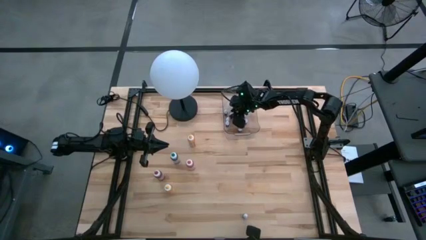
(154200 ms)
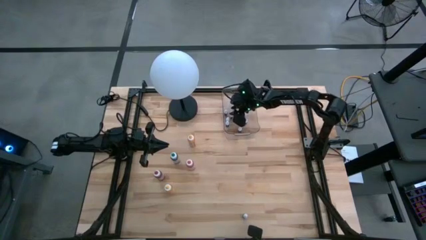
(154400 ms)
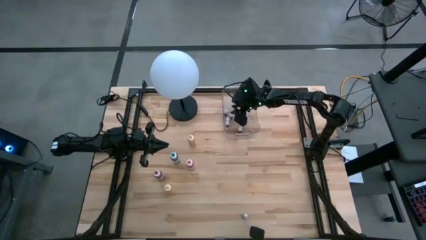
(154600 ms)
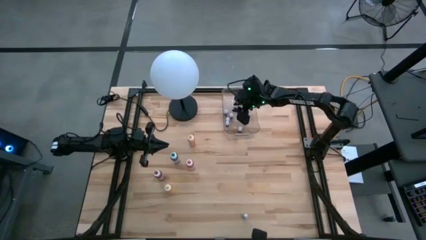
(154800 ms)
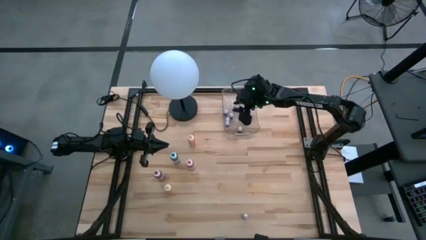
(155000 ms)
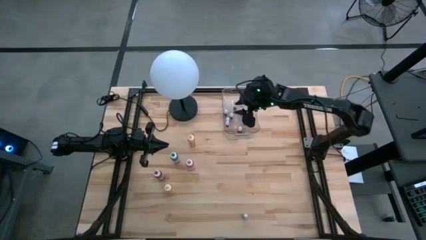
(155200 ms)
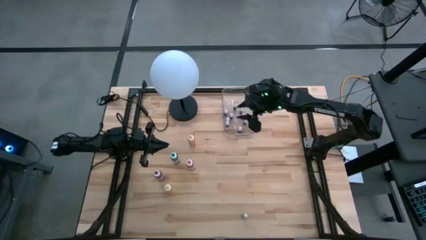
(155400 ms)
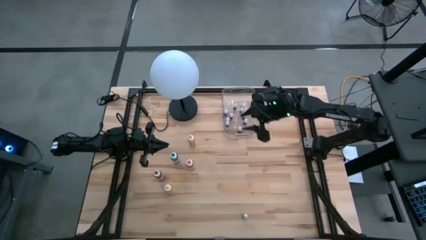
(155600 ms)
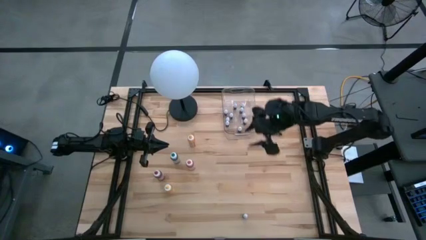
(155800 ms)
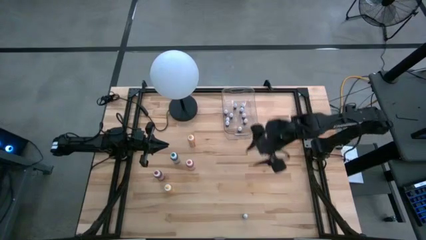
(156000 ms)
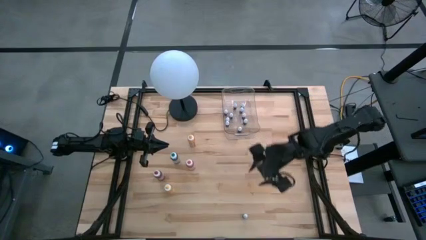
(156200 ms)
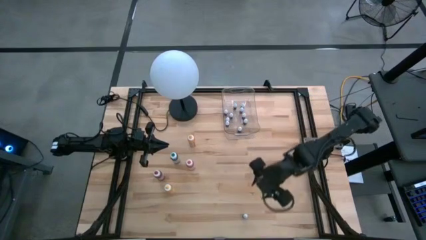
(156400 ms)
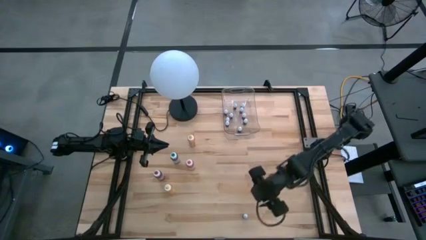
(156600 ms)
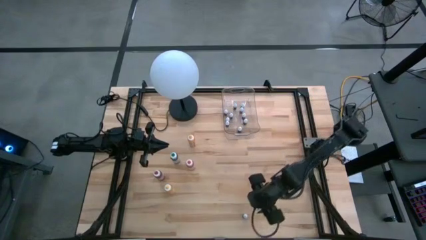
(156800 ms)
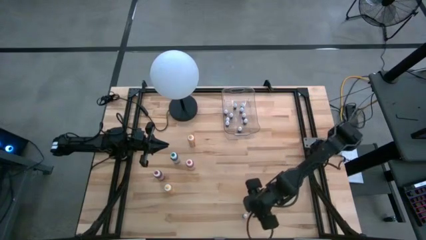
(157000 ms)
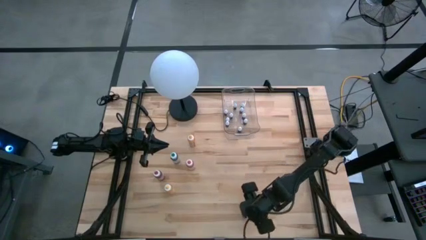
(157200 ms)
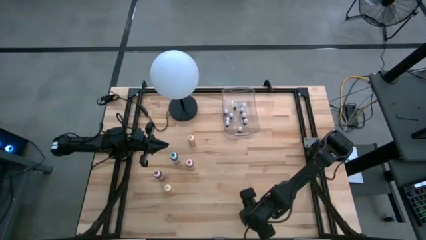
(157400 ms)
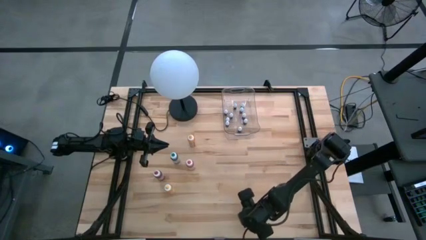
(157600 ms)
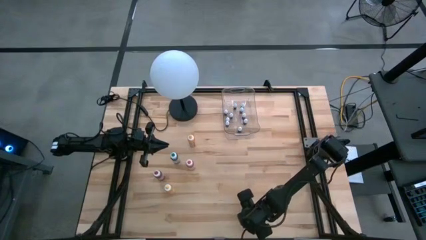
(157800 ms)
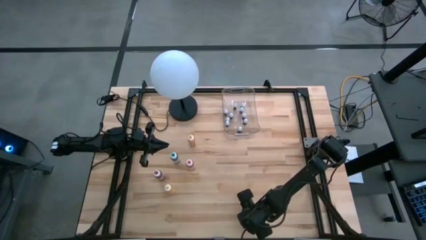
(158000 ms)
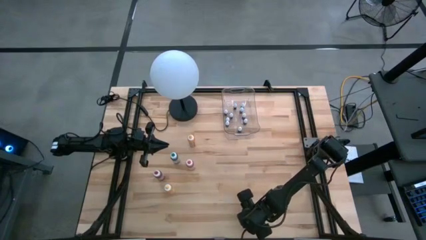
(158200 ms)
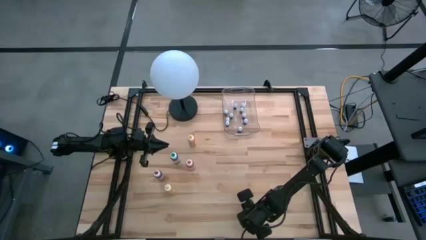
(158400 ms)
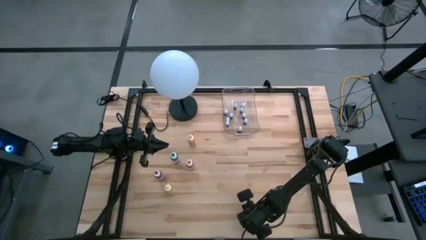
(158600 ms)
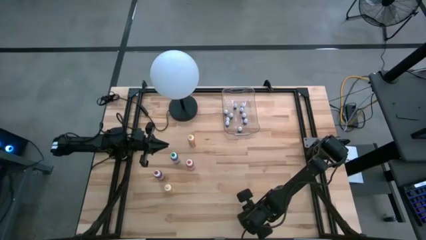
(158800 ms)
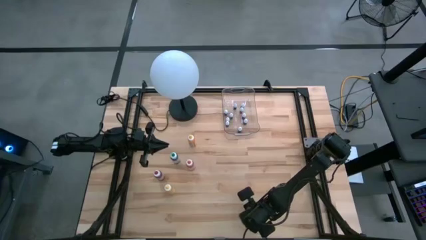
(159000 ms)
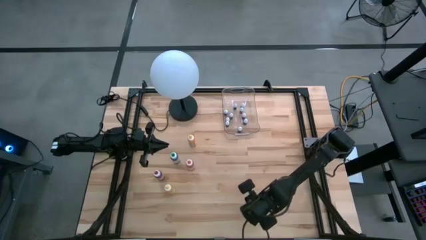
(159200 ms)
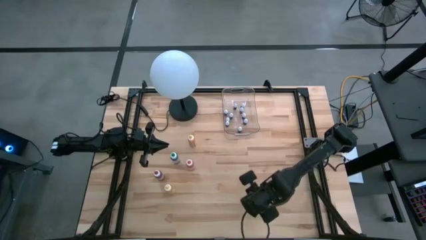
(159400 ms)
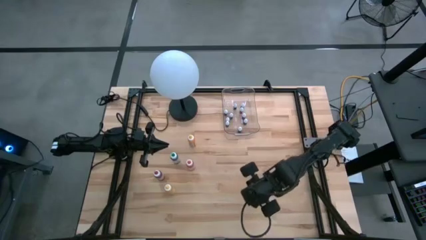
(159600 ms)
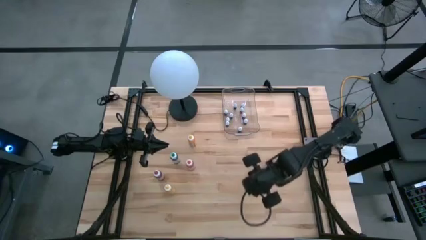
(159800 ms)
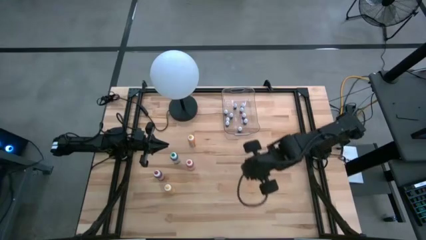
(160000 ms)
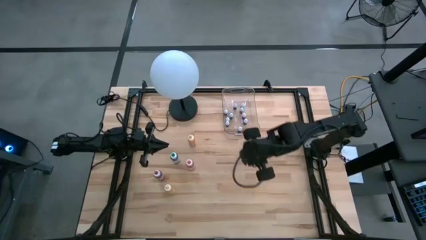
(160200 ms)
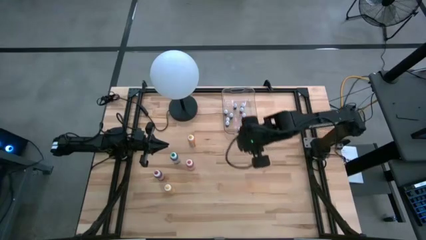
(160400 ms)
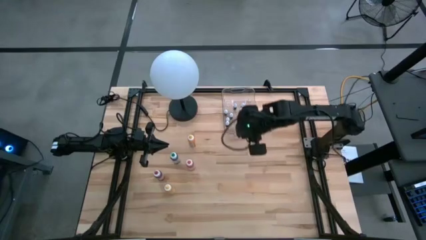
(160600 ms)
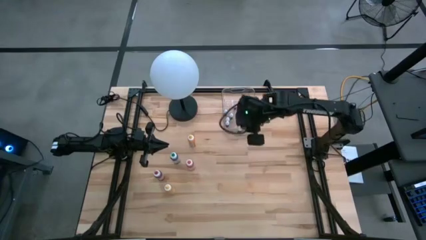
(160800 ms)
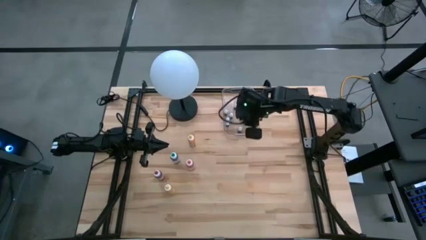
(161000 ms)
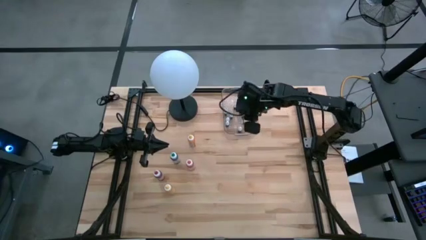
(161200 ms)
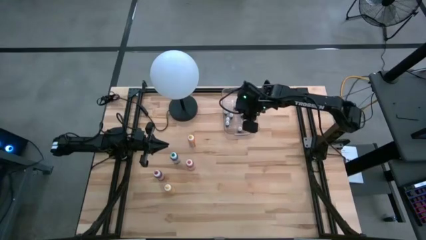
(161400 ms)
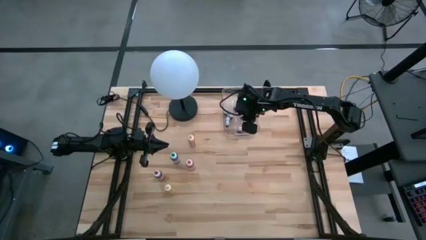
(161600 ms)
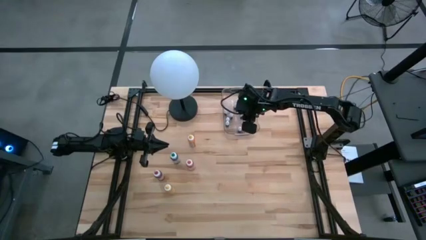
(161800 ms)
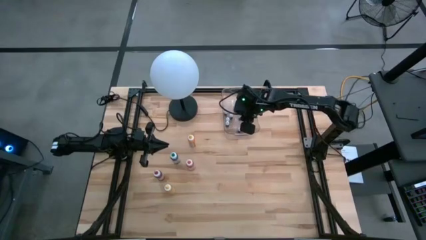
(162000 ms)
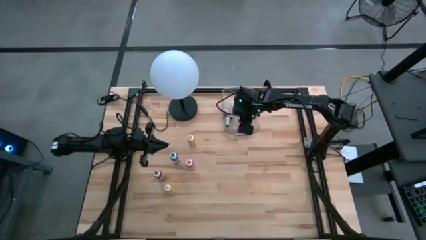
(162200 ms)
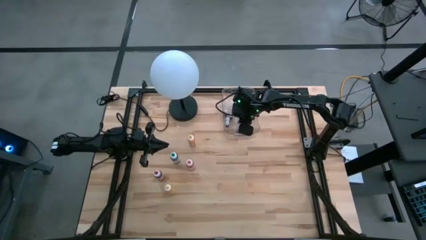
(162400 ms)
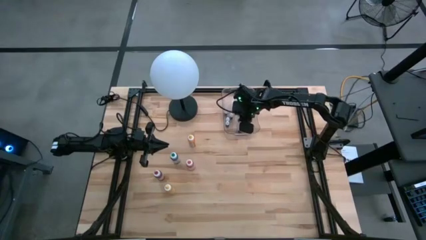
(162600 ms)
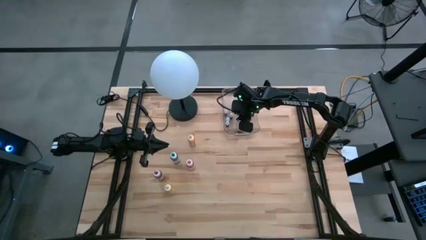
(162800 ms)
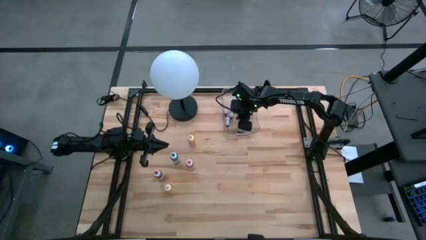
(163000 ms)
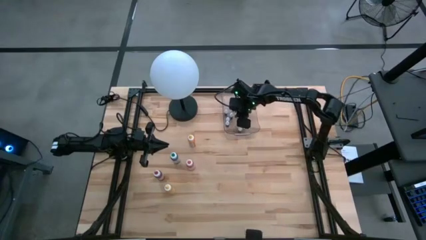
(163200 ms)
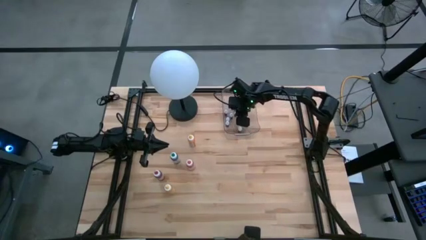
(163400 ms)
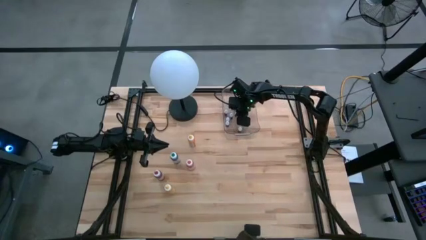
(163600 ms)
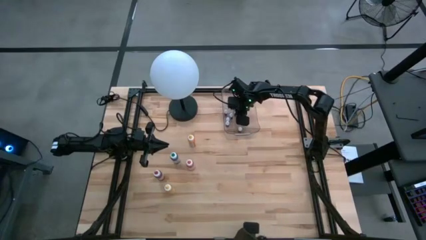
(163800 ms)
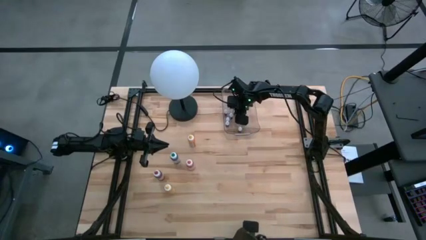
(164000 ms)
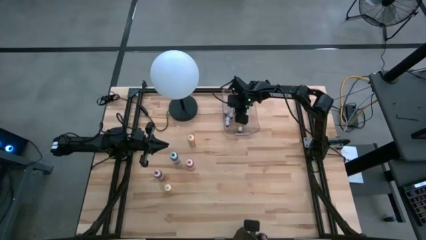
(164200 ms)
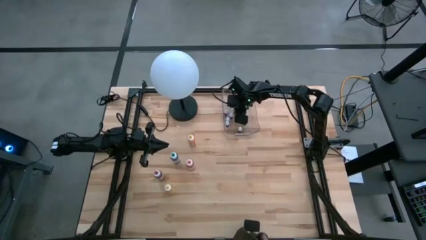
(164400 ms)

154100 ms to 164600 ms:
Task: Pick & Place food coloring
Put the small green food coloring bottle into the transparent bin

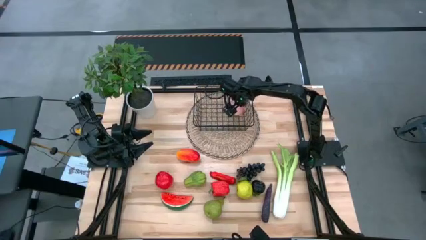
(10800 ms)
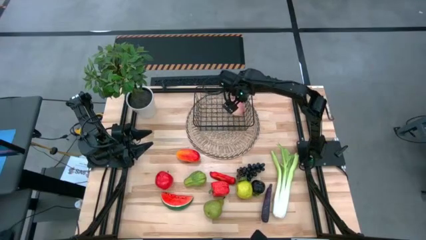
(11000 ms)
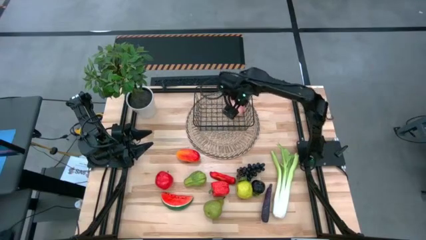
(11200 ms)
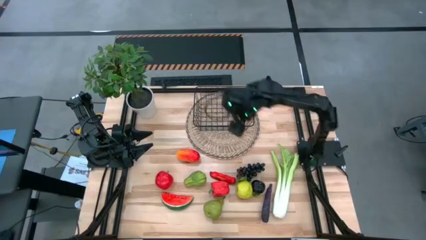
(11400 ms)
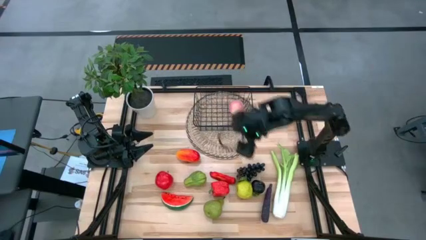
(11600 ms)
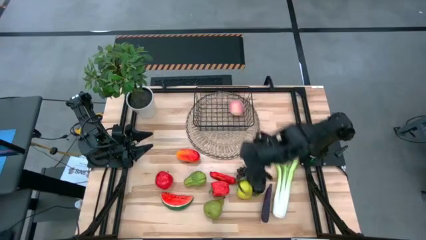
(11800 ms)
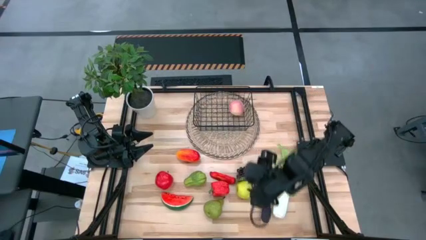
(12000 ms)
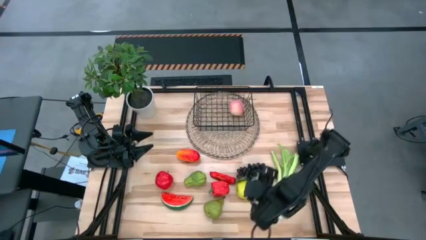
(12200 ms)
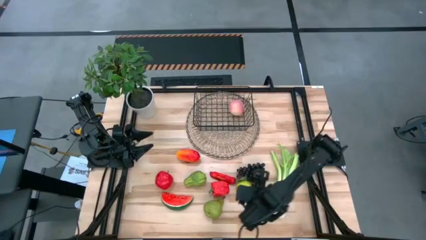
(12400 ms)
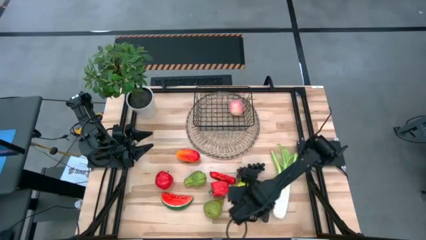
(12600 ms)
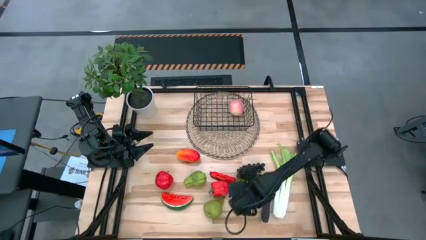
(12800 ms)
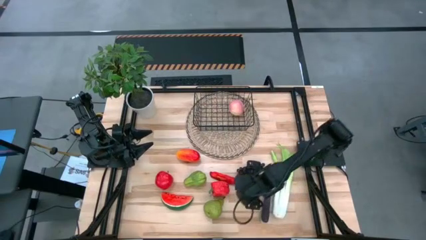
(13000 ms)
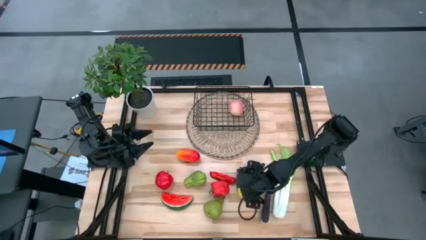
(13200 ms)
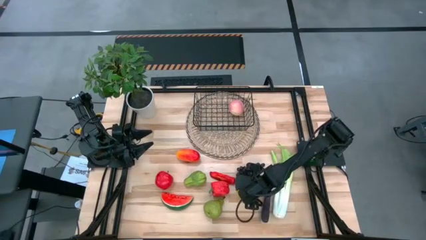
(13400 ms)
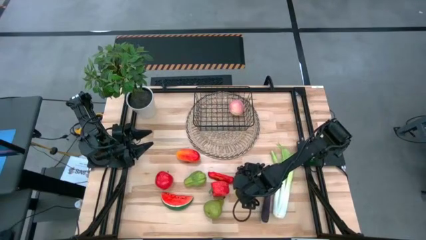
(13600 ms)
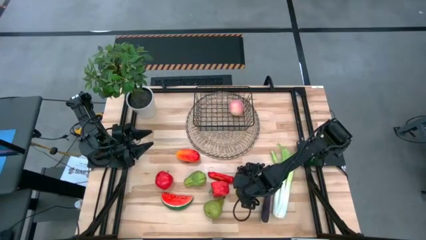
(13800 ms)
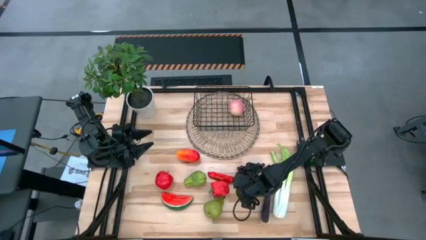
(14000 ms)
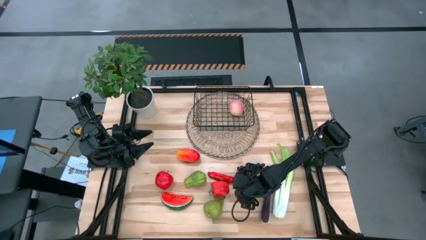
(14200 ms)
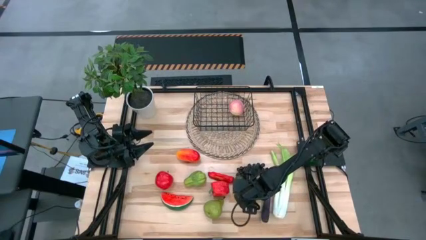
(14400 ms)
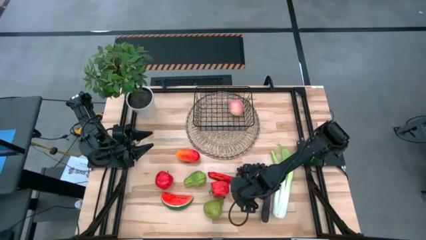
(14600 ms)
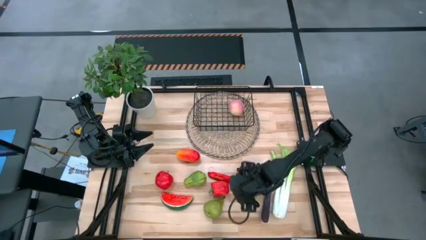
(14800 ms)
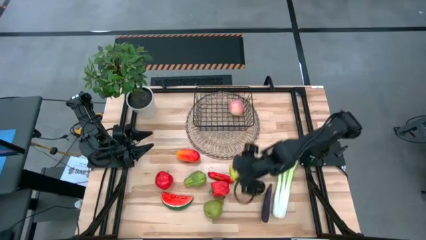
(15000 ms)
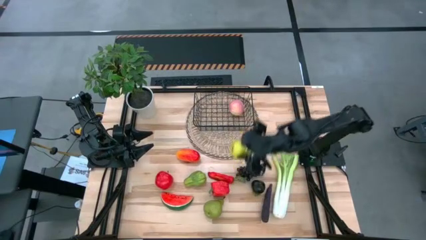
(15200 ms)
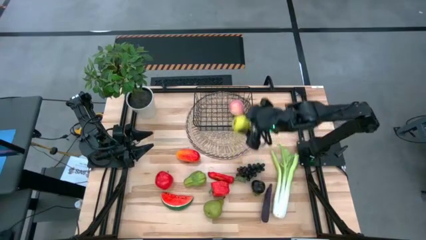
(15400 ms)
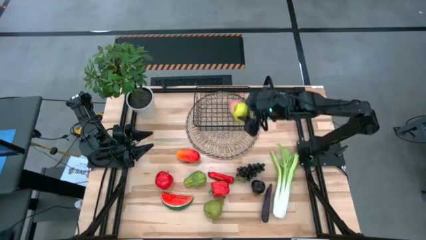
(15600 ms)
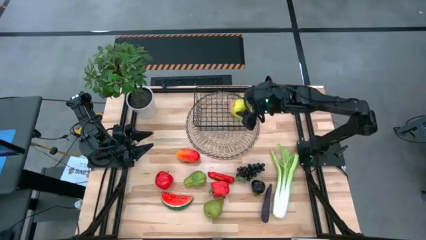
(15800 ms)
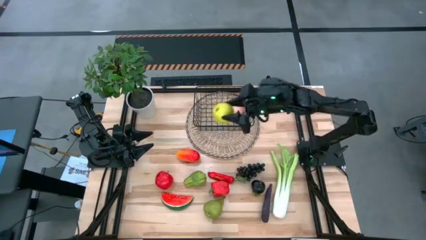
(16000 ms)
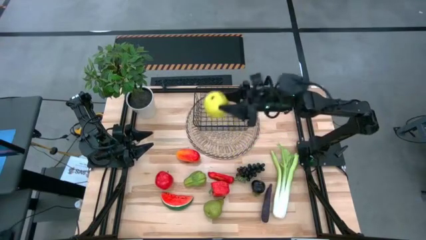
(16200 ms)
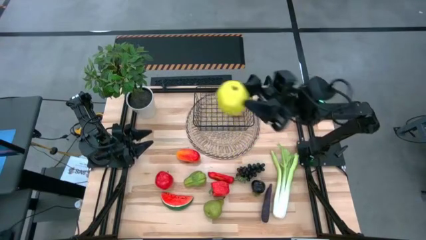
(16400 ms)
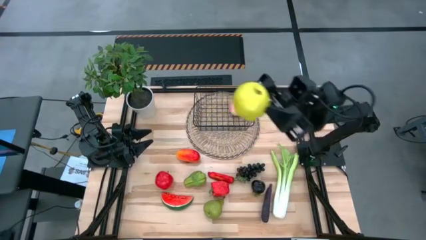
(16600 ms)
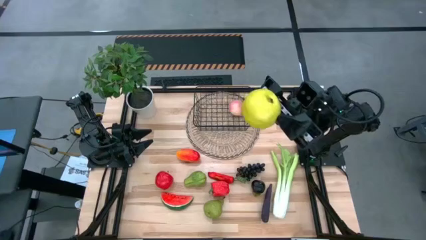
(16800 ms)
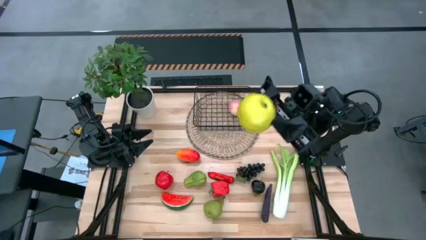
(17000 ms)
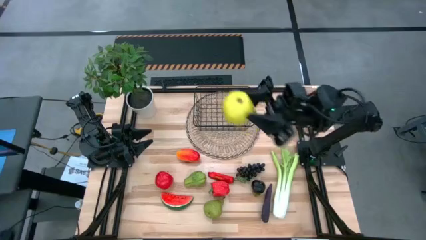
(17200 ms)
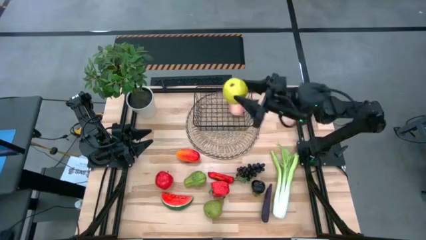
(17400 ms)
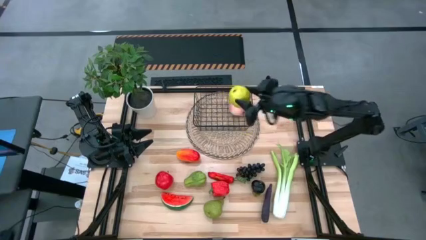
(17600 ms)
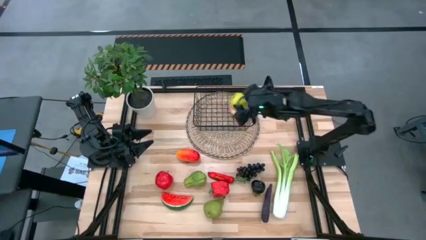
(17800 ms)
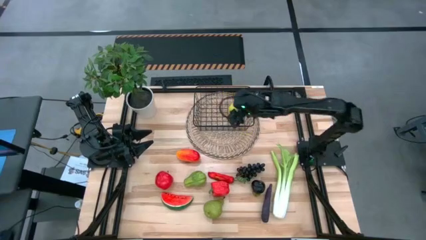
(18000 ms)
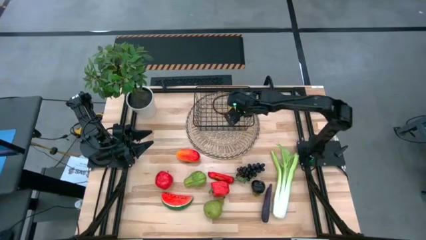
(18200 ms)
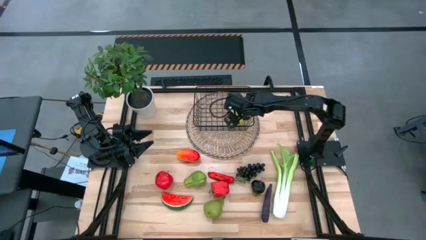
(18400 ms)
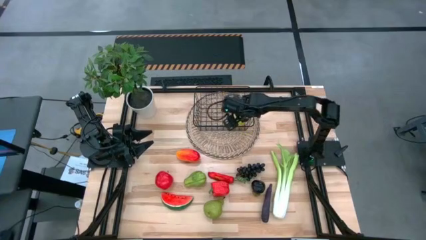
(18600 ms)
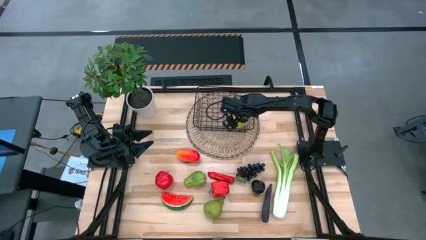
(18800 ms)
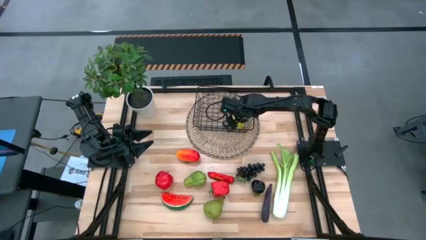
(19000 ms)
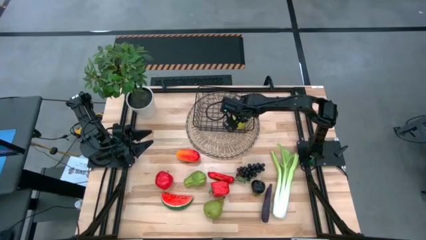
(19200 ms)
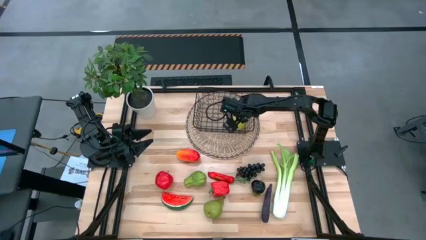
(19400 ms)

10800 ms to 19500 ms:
Task: Build produce basket
Put the green apple into the black wire basket
